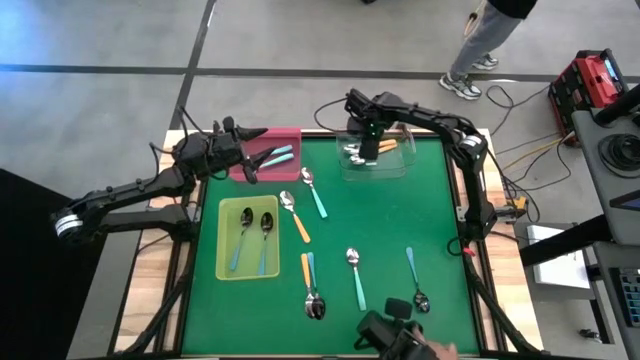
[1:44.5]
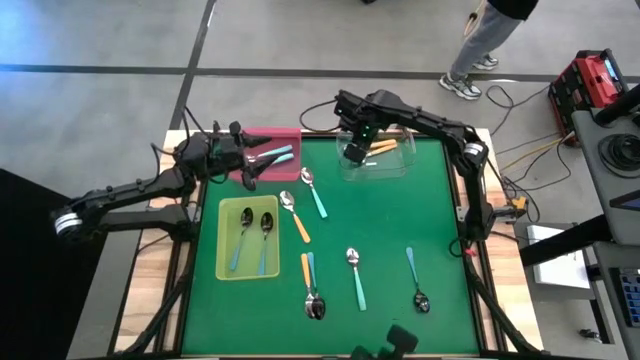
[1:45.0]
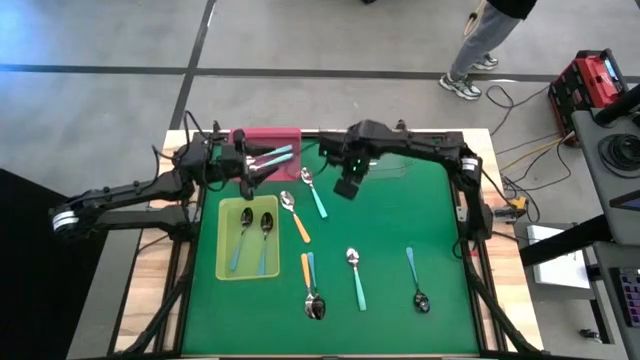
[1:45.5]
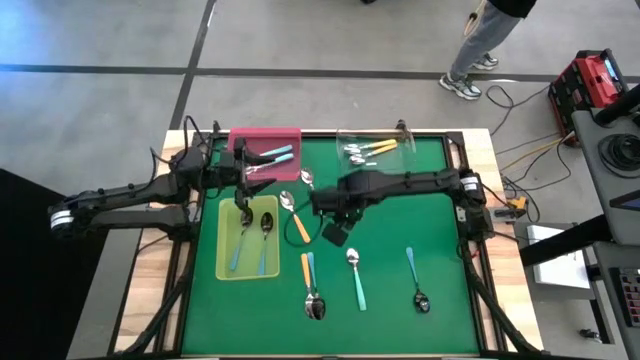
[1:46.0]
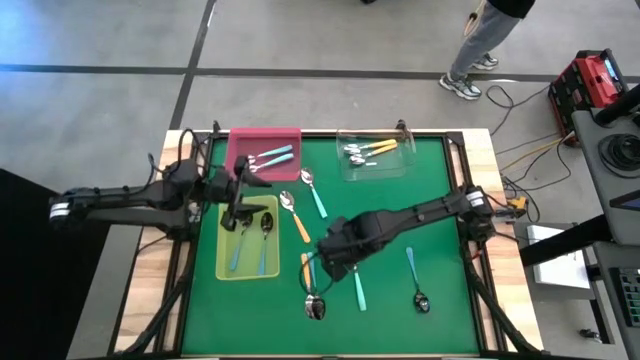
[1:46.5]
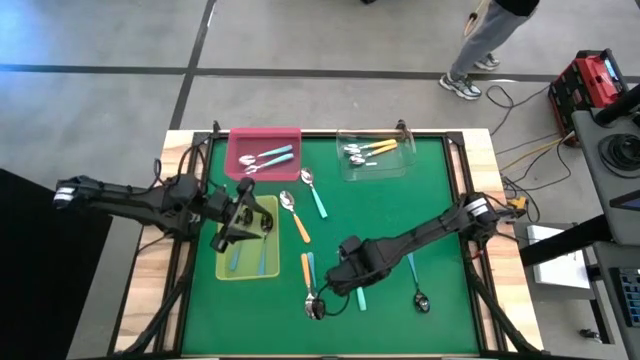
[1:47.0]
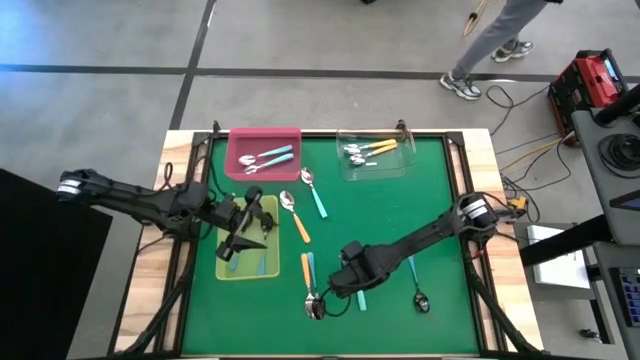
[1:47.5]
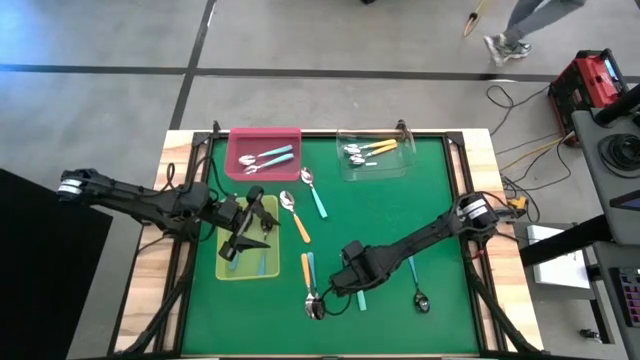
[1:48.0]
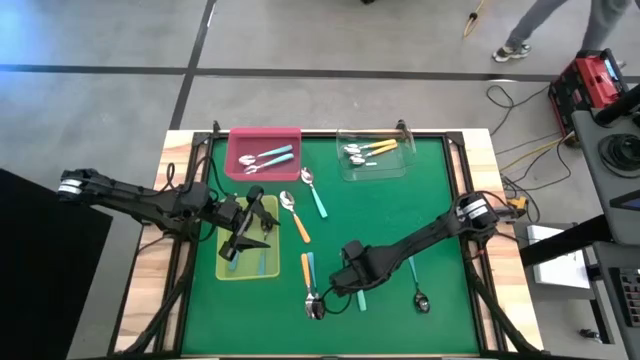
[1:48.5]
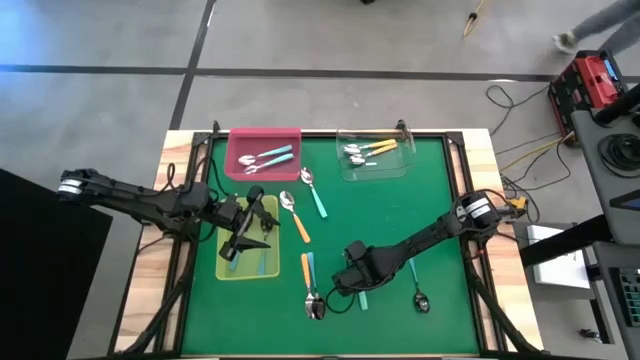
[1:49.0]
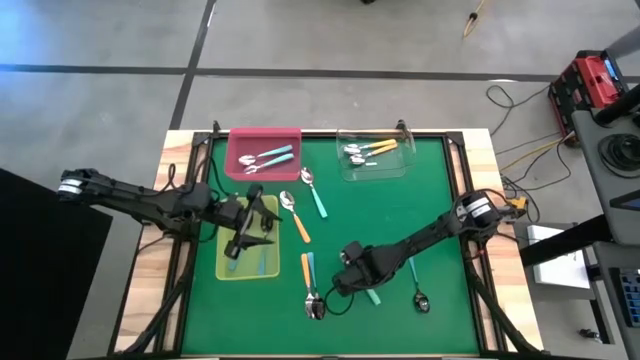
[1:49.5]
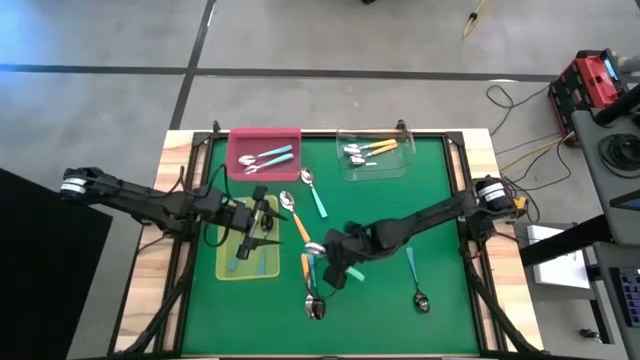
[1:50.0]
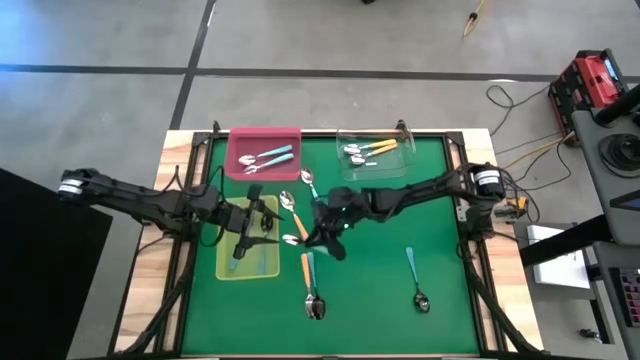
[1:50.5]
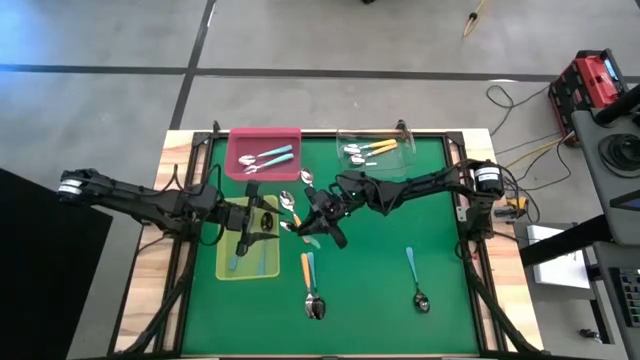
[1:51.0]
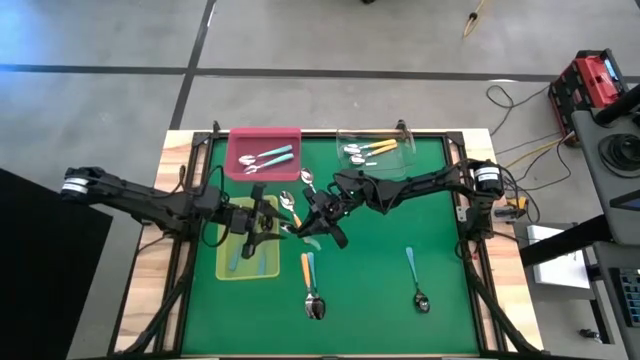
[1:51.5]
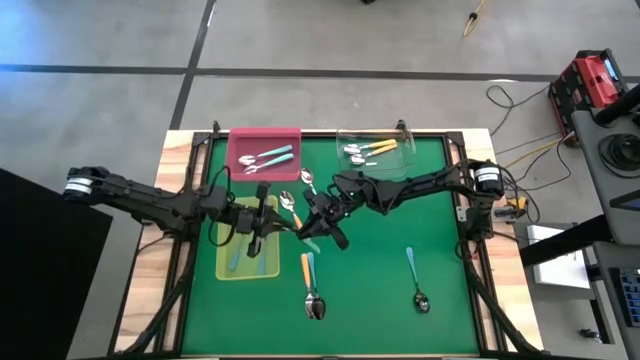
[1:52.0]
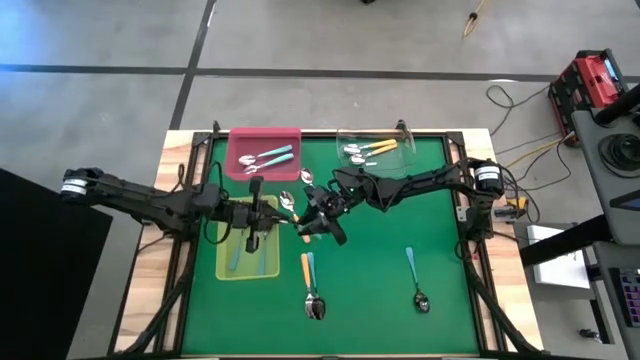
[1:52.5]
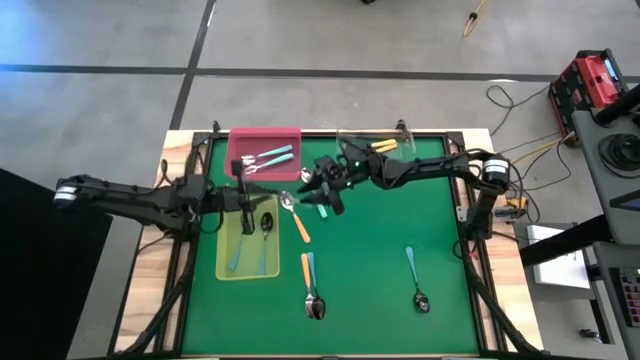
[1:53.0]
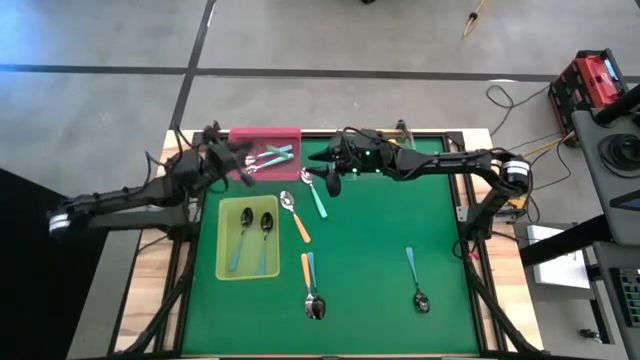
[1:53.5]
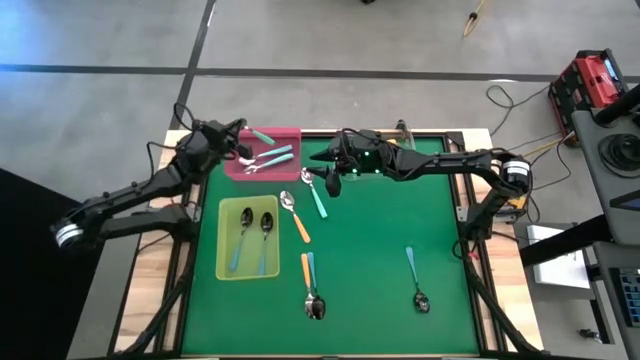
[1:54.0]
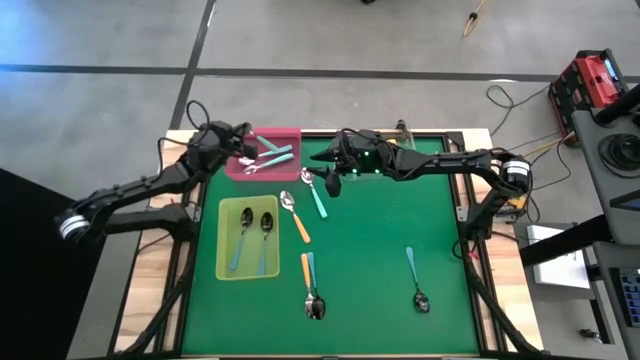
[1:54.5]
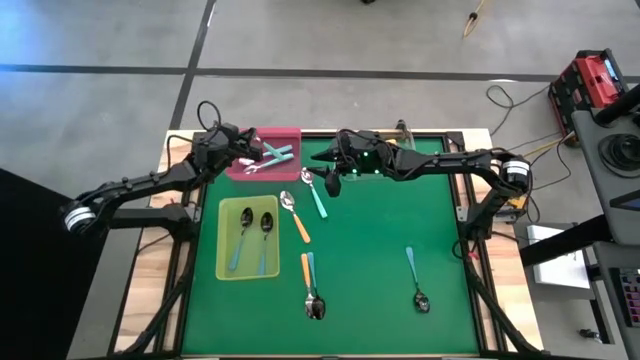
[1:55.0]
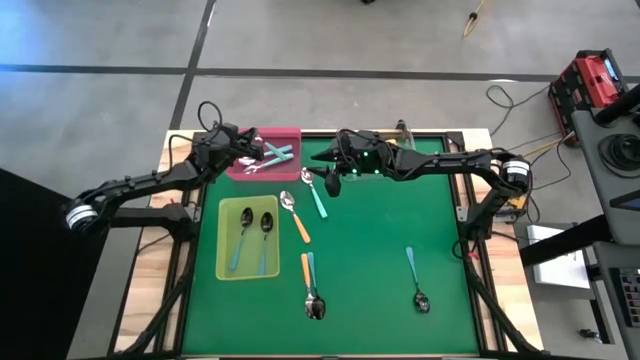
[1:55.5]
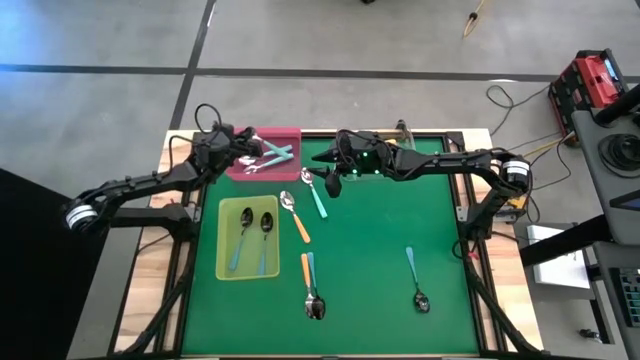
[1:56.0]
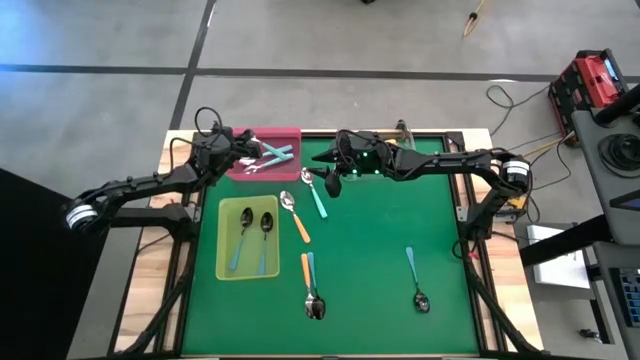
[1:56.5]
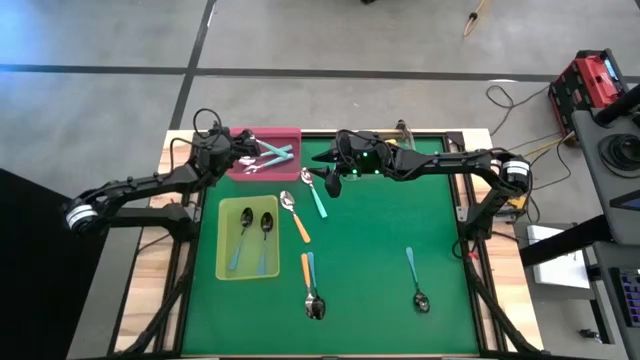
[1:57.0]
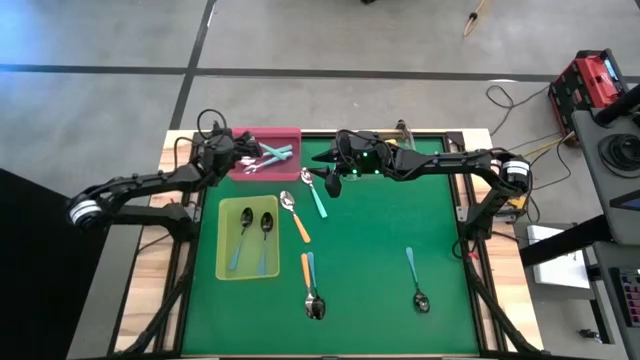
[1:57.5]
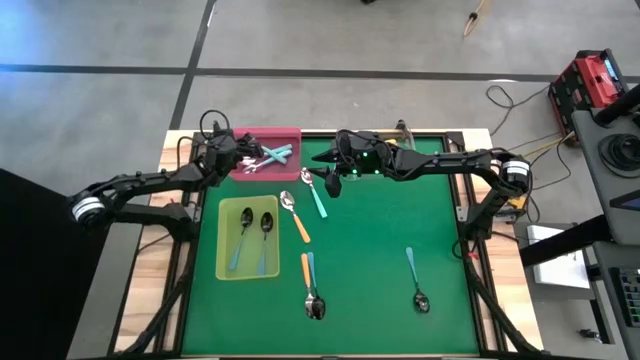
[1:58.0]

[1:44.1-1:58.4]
Task: Sort silverware by color (type)
Put the light blue spoon into the red bin

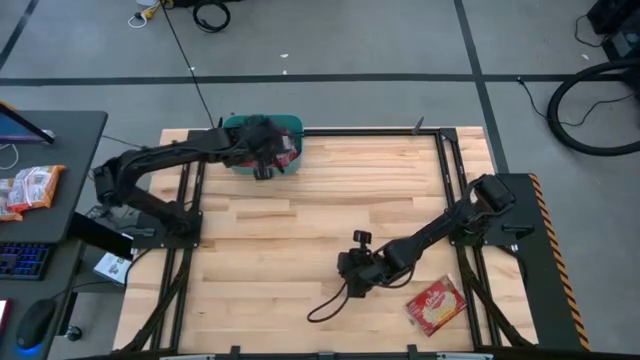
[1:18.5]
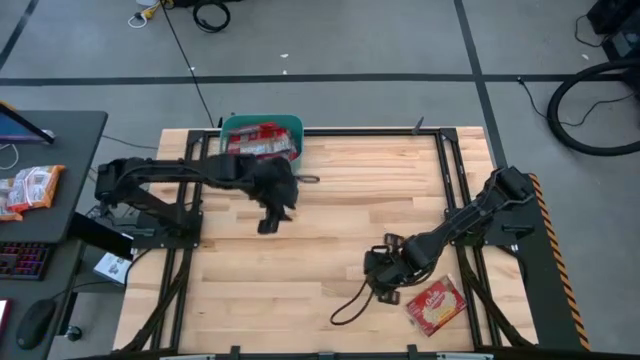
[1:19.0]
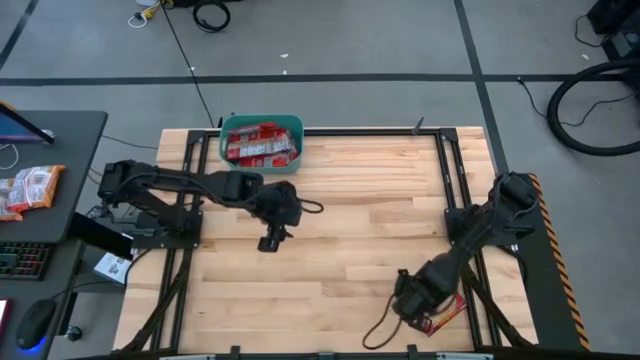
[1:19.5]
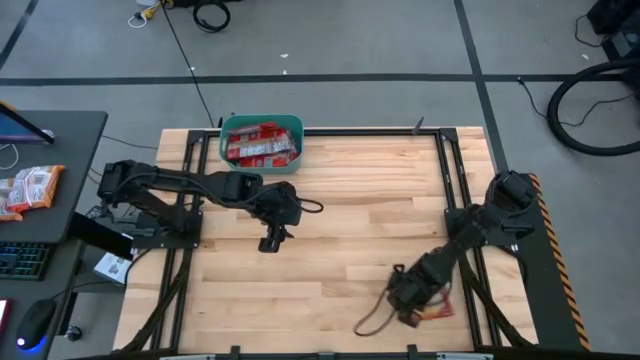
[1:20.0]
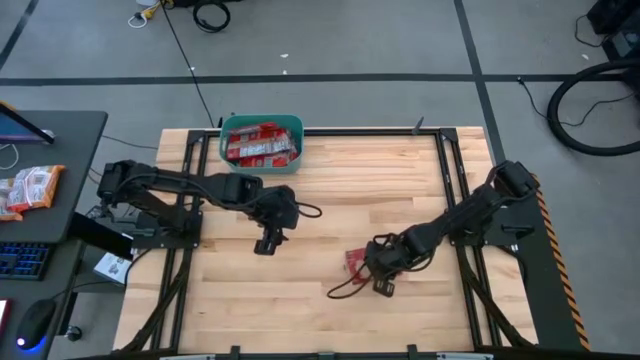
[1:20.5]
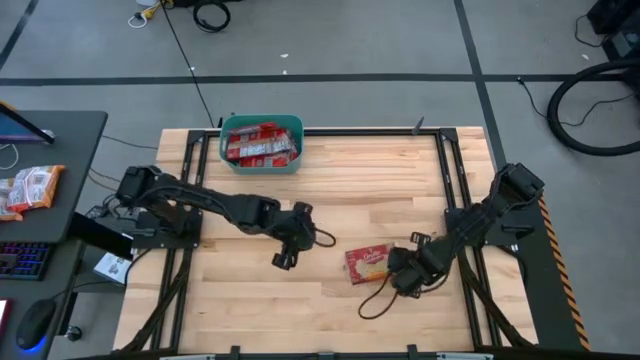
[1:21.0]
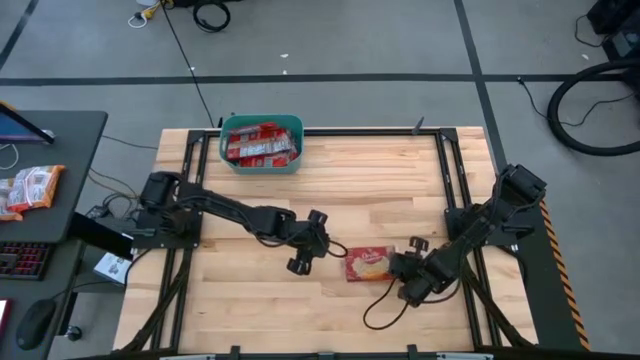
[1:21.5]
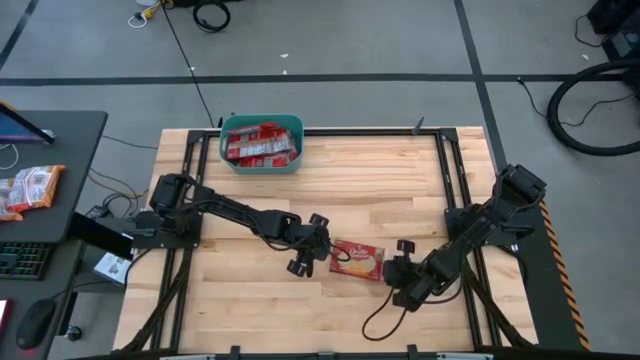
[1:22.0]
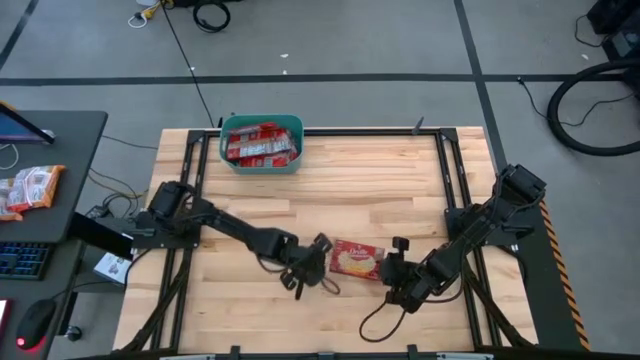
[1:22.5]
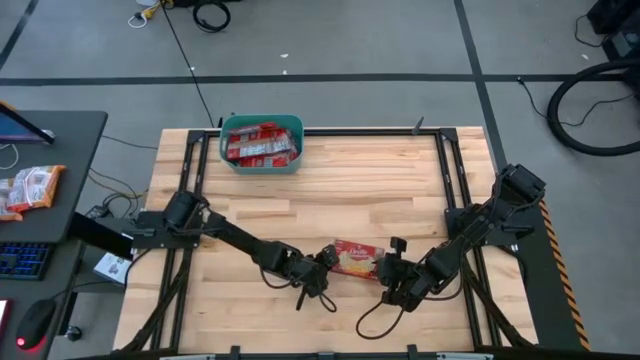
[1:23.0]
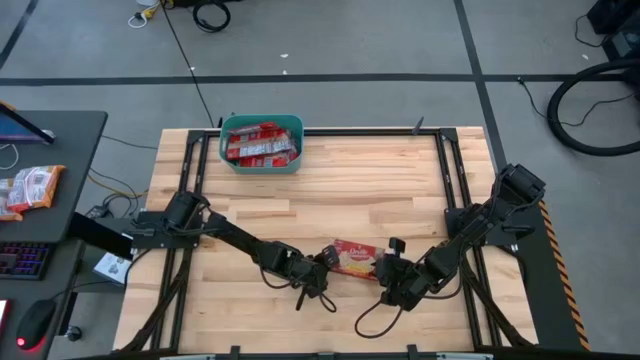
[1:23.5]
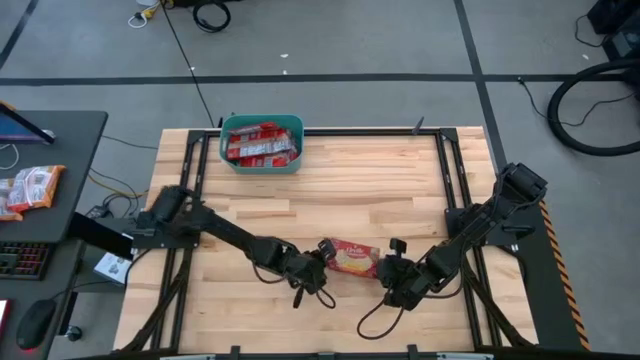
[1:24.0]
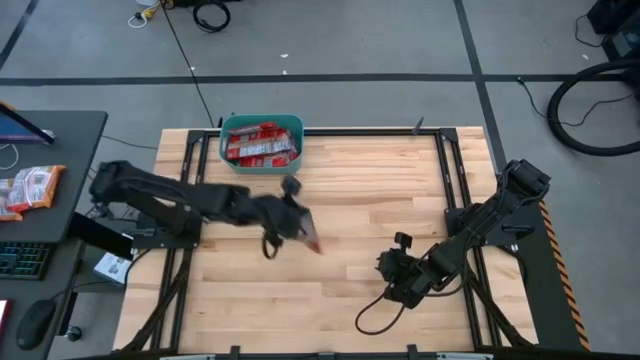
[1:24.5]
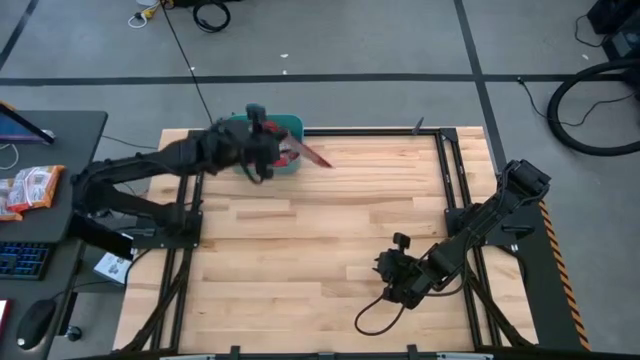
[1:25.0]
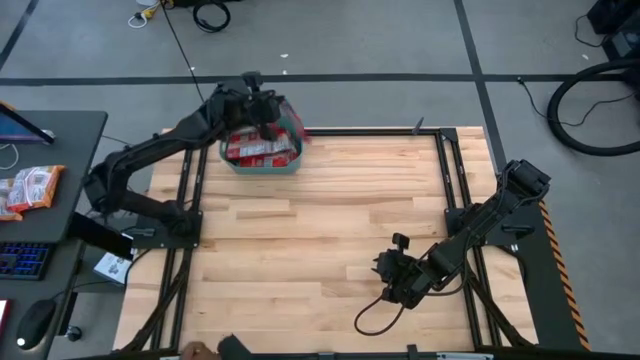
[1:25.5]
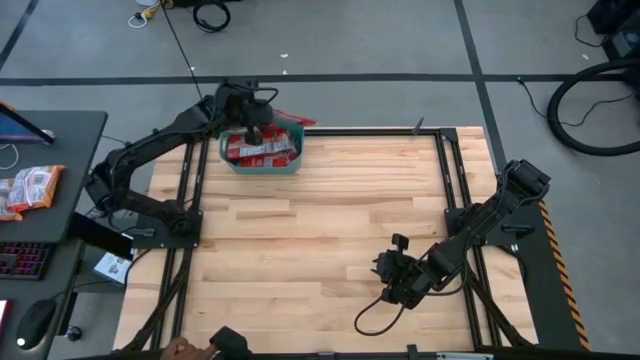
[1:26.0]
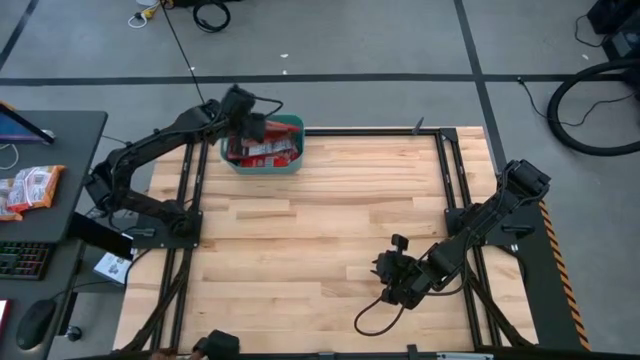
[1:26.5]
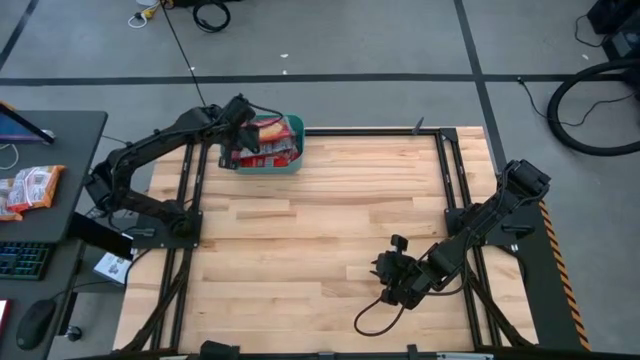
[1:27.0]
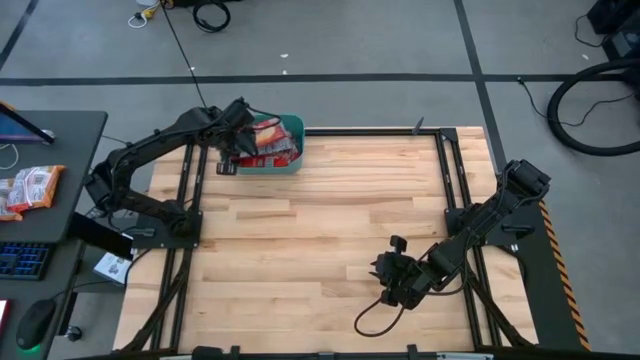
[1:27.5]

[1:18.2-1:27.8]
Task: Sort popcorn bags into baskets
Put the popcorn bag into the blue bin
